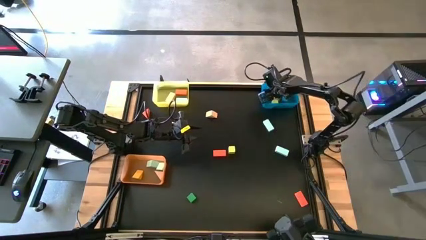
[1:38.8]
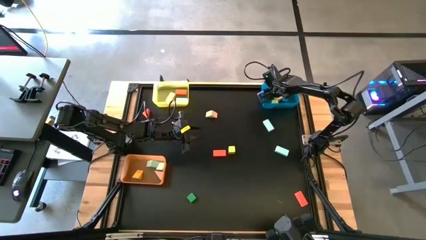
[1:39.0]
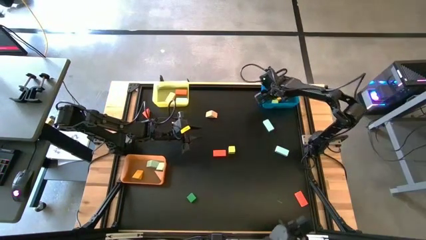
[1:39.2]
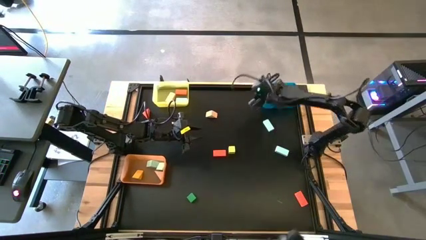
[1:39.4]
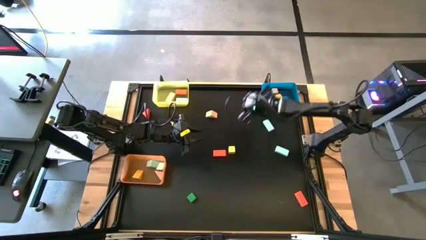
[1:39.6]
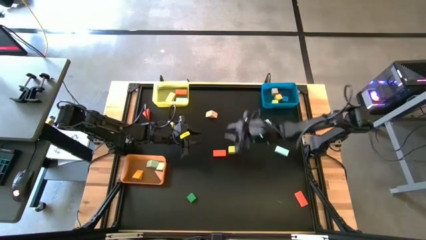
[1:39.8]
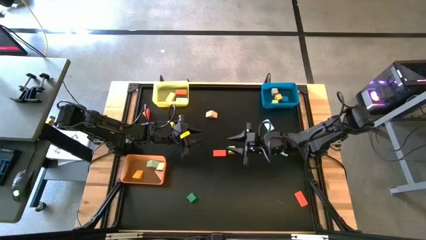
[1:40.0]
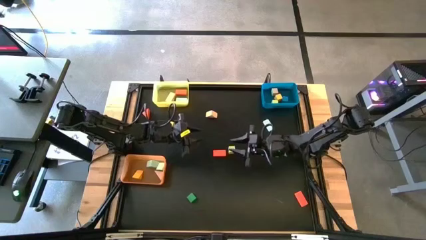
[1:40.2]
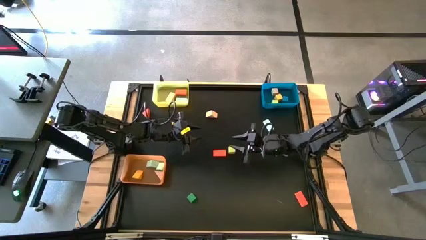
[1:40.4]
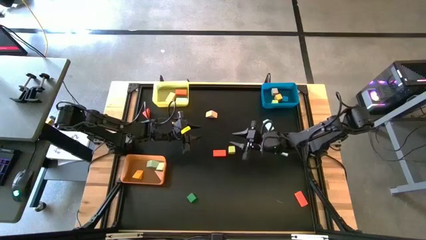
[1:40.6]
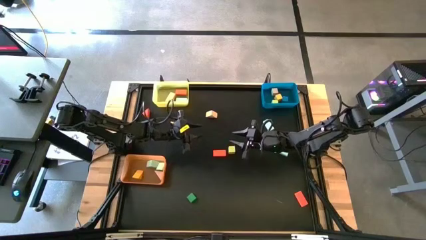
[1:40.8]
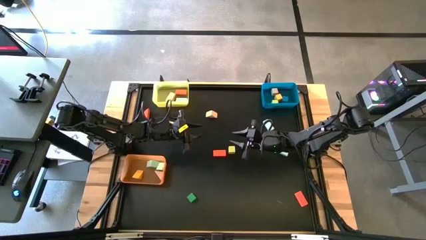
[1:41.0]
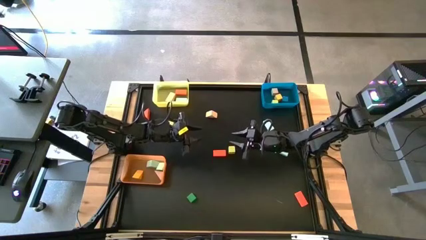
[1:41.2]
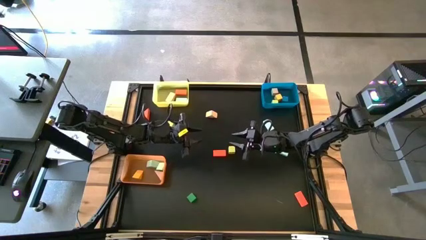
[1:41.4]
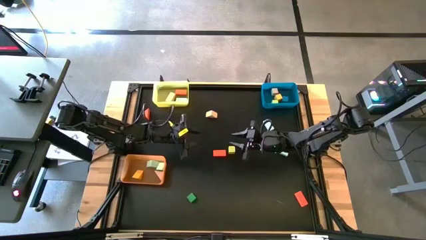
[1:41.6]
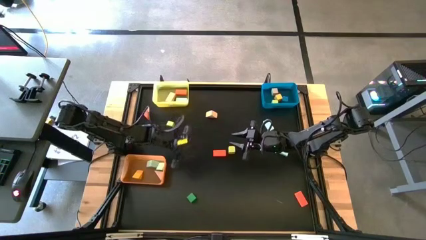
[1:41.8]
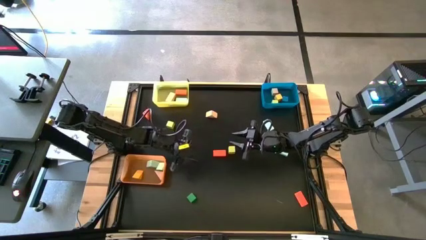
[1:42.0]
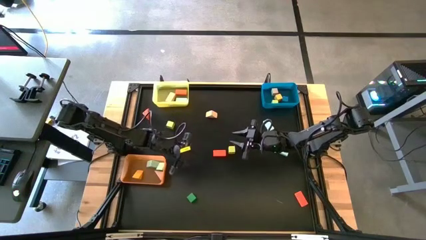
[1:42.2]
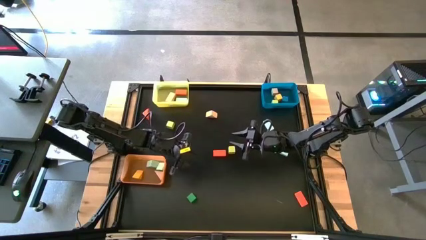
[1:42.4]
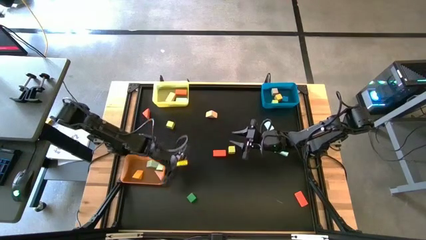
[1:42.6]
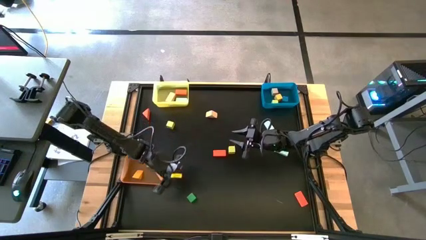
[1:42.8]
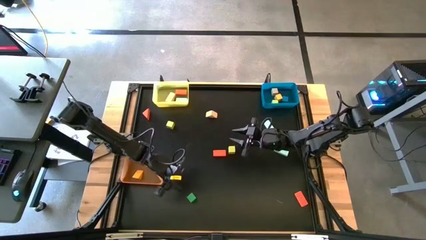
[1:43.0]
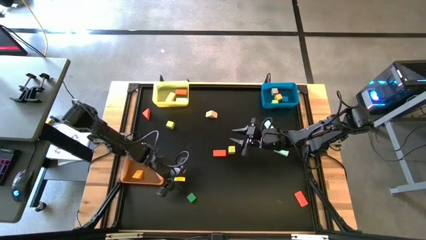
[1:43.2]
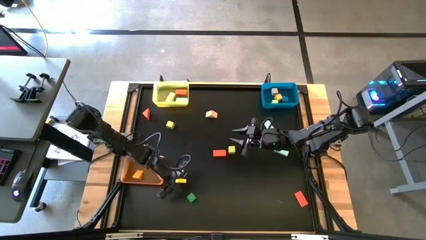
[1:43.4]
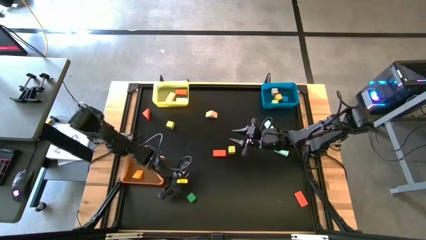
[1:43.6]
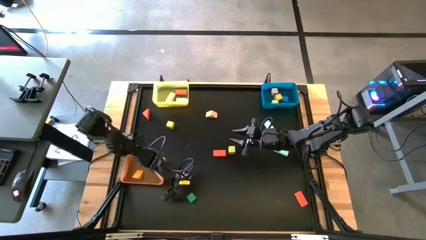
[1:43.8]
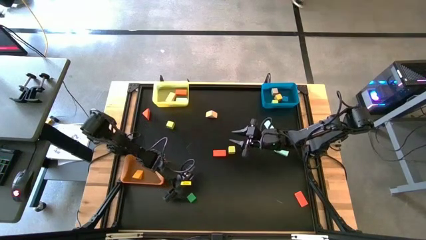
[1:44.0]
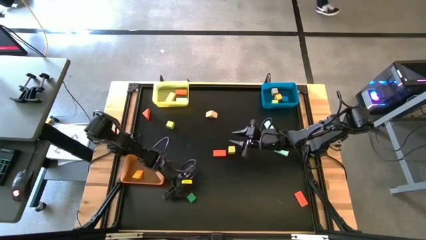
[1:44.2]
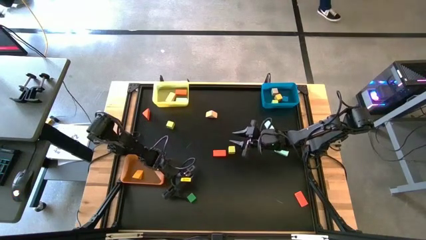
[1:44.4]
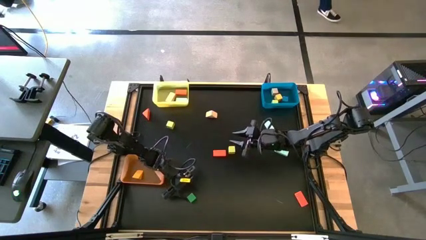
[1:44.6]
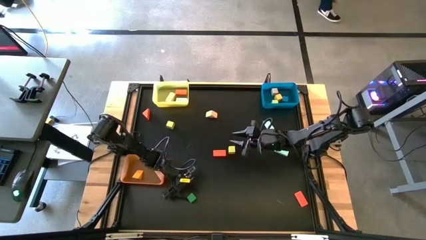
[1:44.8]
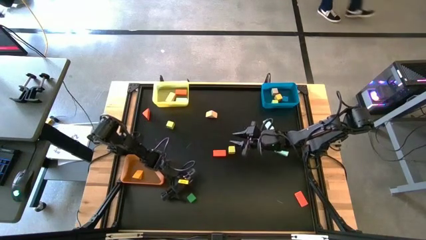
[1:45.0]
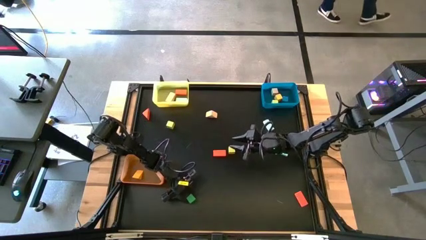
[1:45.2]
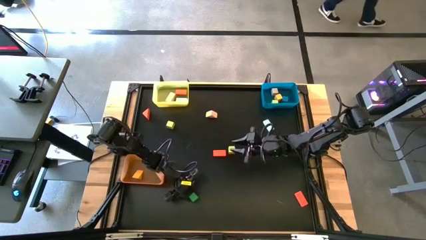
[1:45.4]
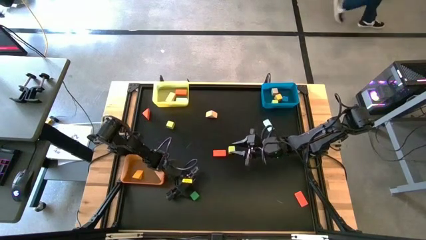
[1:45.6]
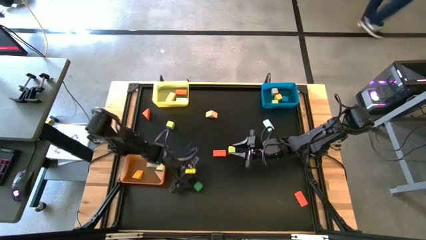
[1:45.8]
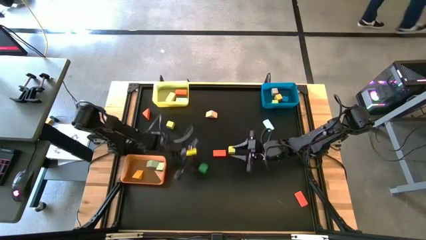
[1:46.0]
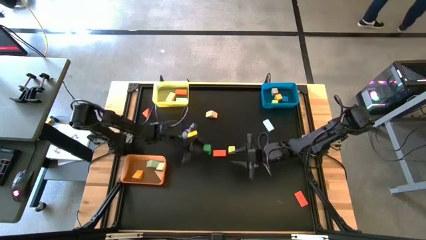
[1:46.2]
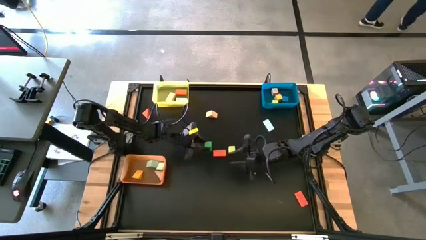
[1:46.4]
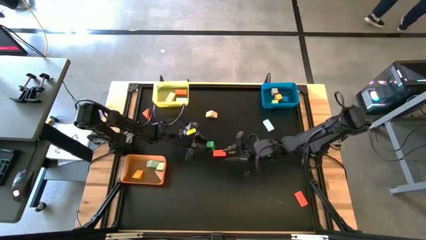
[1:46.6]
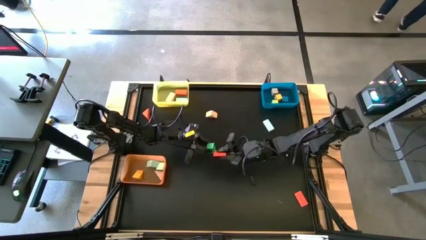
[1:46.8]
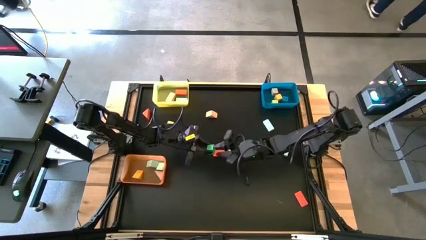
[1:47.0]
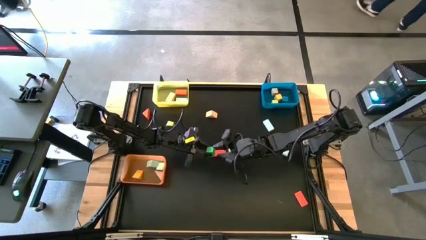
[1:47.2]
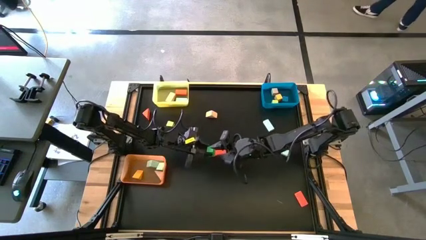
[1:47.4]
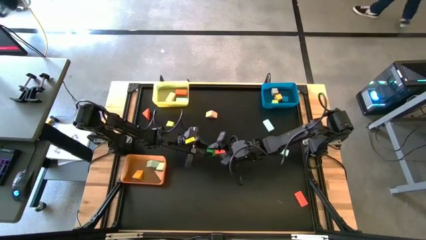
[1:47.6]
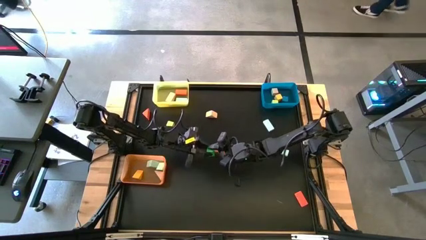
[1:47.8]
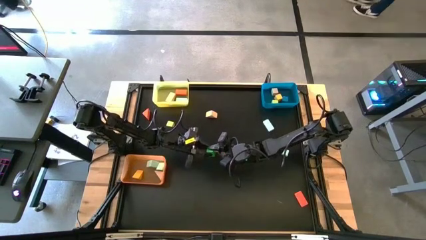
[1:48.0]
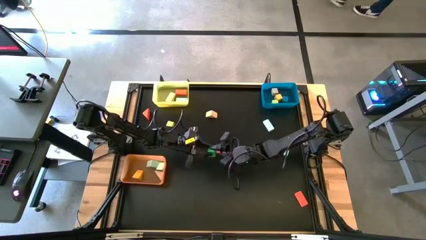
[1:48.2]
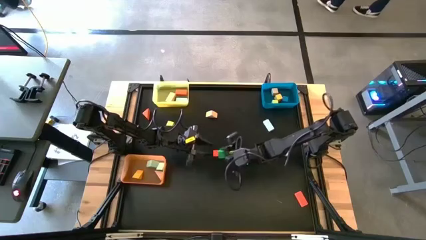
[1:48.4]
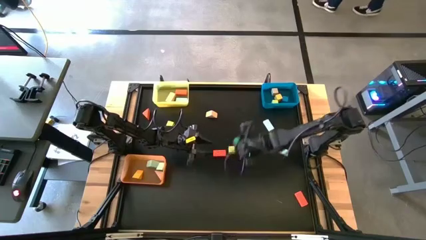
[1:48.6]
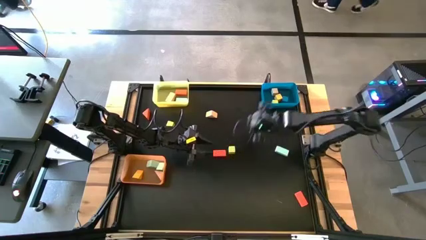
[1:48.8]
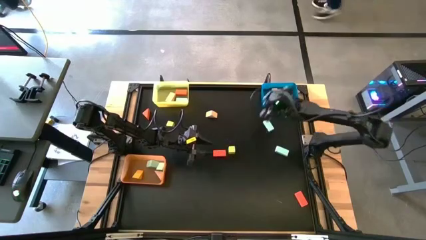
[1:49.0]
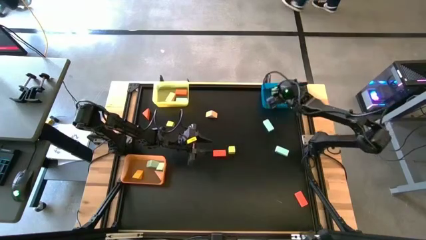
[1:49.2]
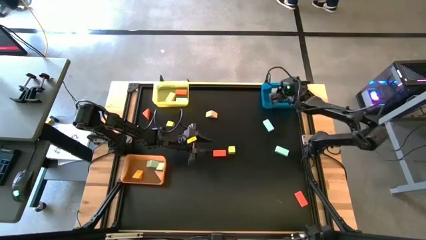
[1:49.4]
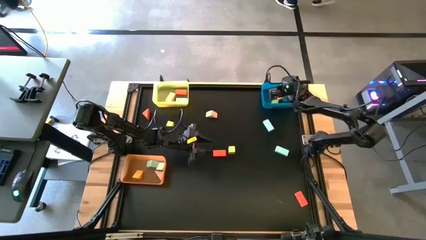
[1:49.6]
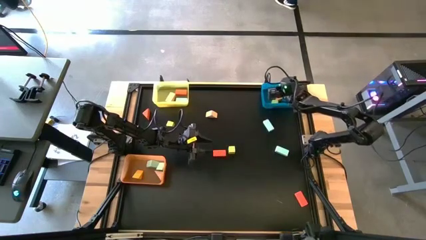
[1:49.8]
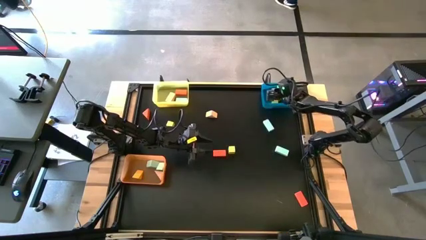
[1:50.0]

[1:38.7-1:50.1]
Task: Sort blocks by size
Put the green wooden block into the blue bin
